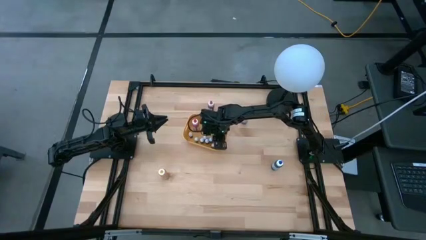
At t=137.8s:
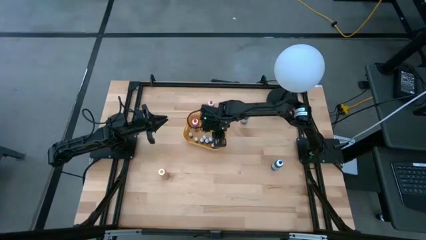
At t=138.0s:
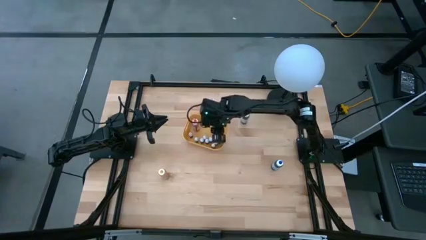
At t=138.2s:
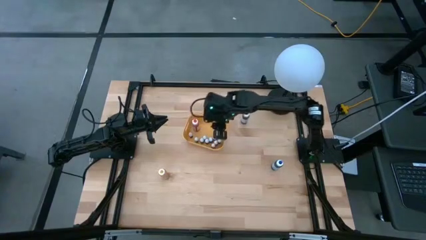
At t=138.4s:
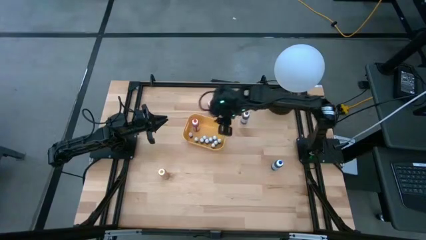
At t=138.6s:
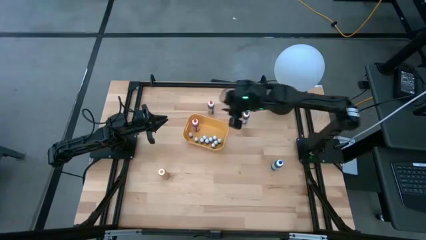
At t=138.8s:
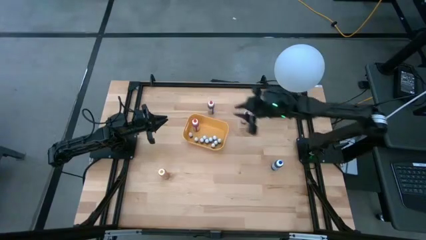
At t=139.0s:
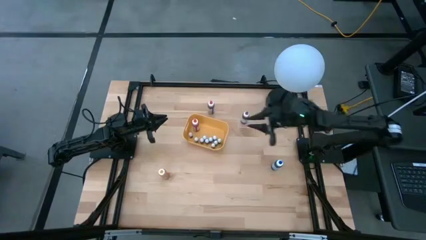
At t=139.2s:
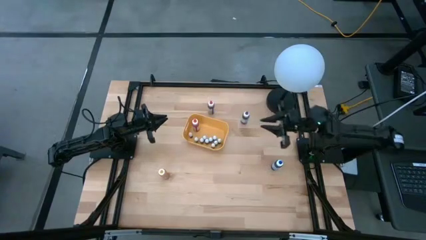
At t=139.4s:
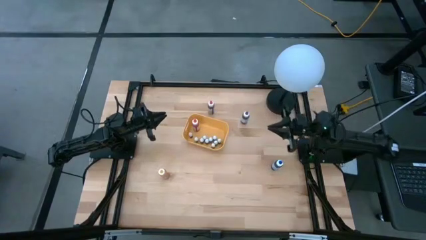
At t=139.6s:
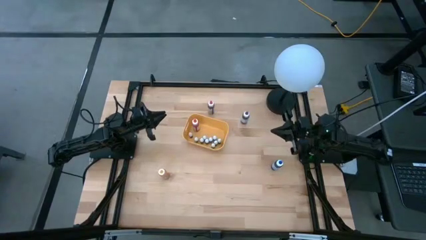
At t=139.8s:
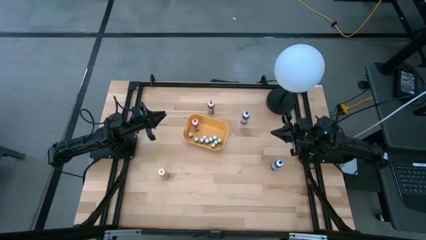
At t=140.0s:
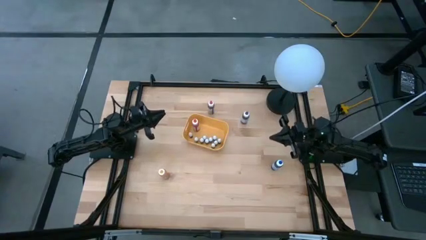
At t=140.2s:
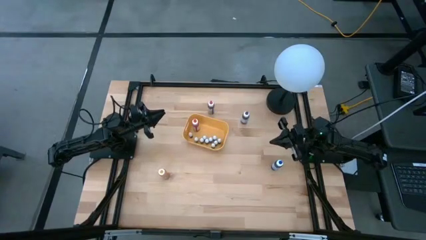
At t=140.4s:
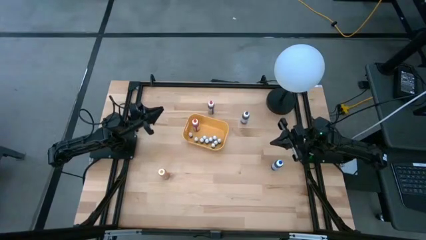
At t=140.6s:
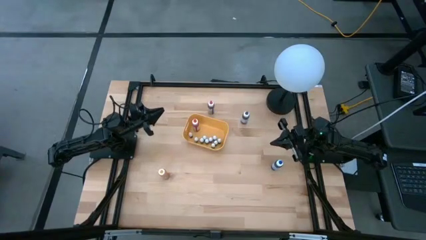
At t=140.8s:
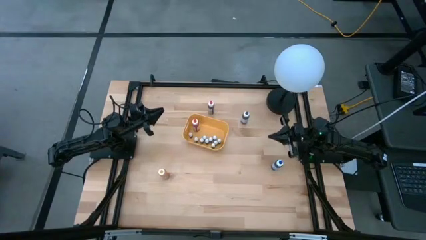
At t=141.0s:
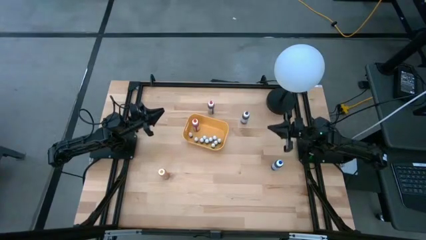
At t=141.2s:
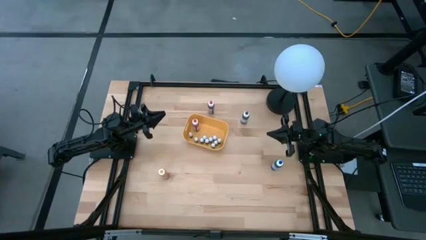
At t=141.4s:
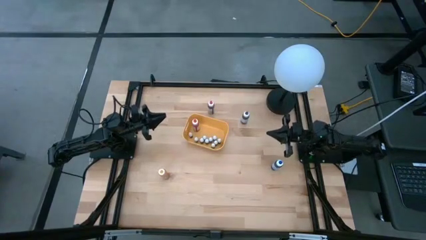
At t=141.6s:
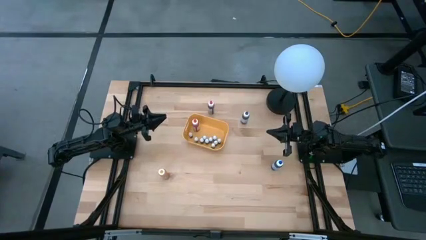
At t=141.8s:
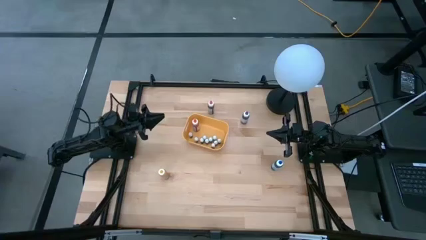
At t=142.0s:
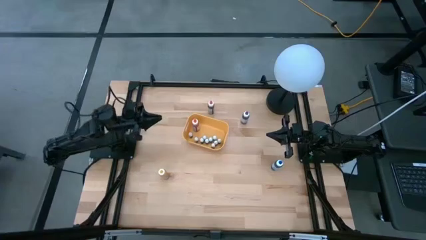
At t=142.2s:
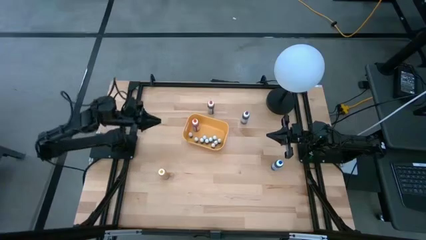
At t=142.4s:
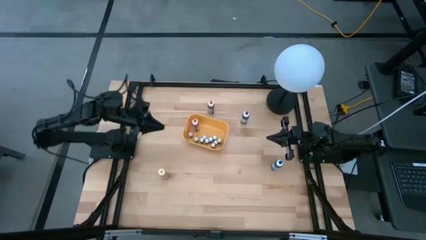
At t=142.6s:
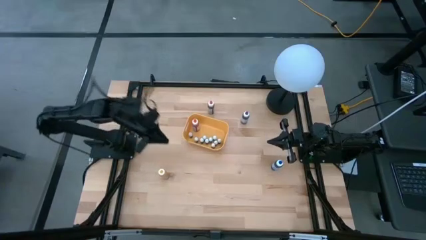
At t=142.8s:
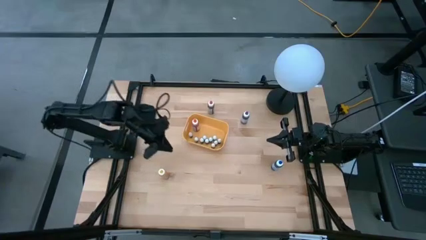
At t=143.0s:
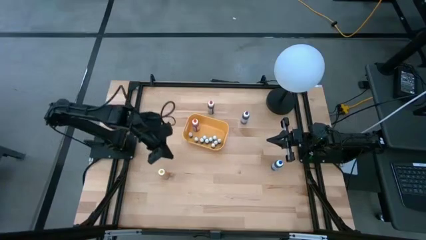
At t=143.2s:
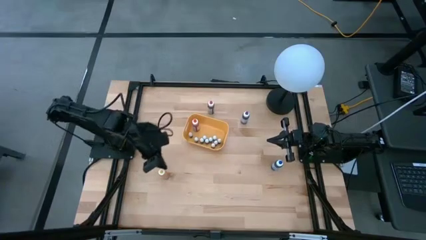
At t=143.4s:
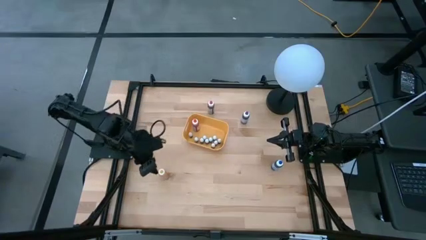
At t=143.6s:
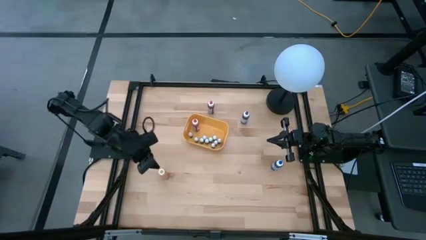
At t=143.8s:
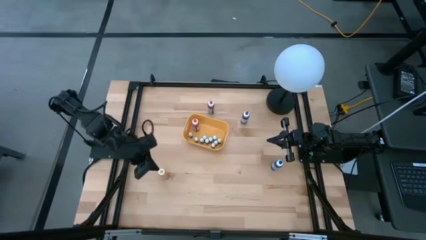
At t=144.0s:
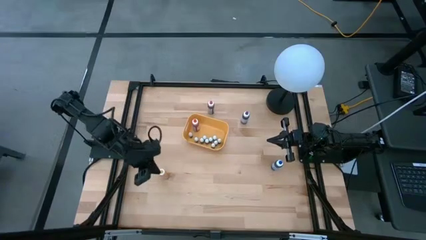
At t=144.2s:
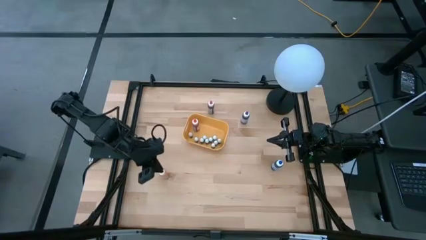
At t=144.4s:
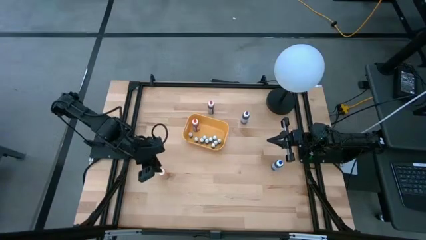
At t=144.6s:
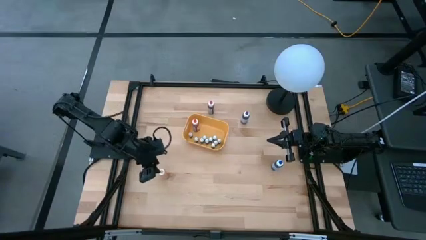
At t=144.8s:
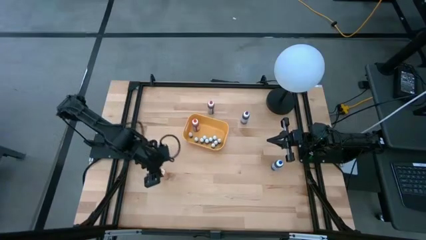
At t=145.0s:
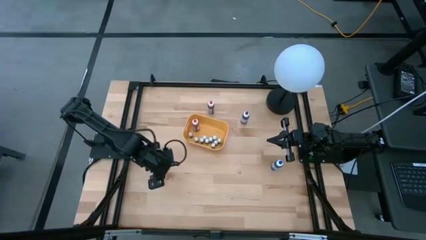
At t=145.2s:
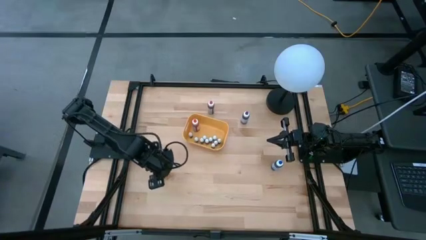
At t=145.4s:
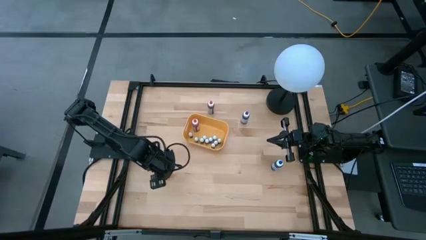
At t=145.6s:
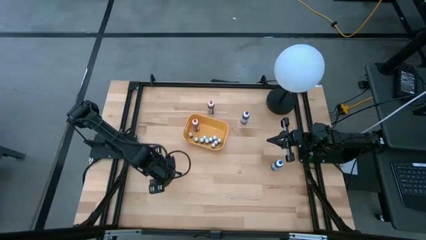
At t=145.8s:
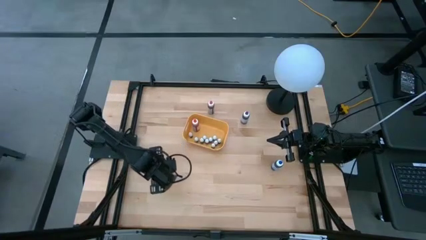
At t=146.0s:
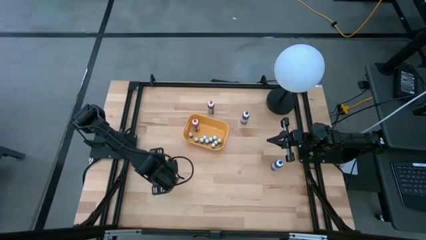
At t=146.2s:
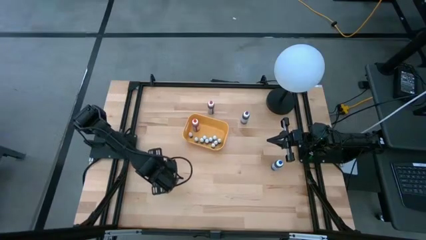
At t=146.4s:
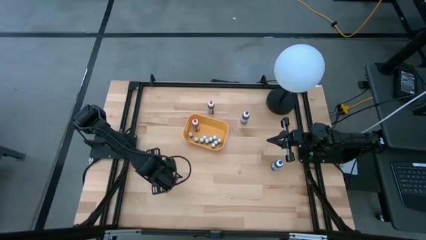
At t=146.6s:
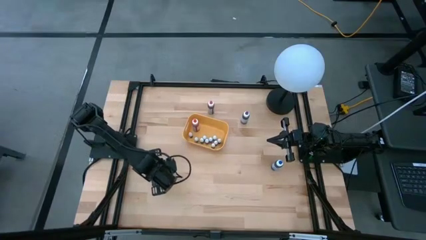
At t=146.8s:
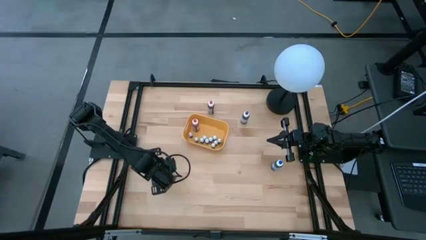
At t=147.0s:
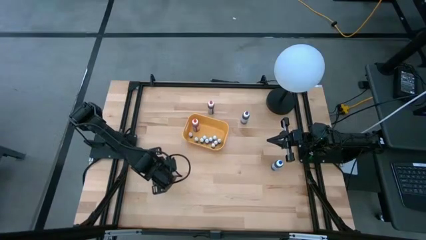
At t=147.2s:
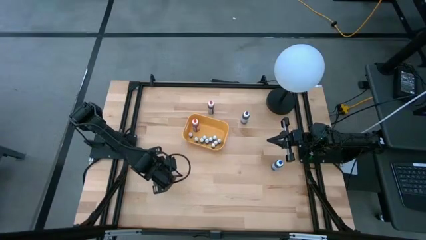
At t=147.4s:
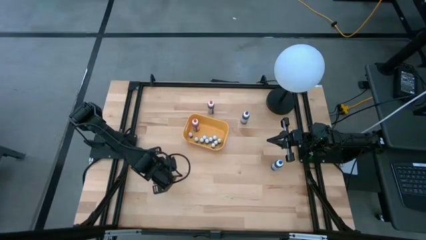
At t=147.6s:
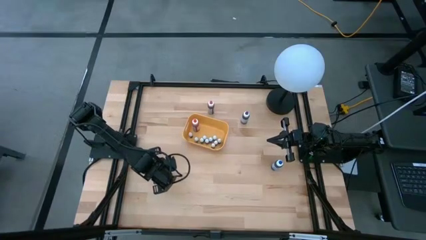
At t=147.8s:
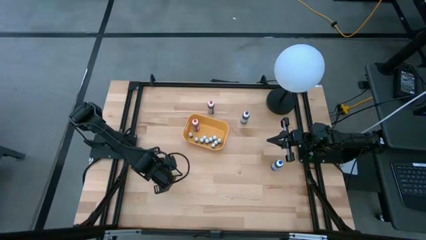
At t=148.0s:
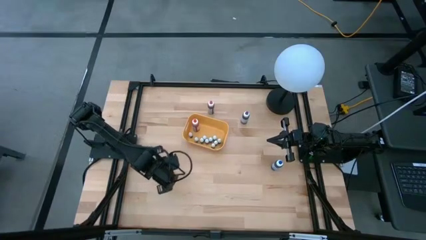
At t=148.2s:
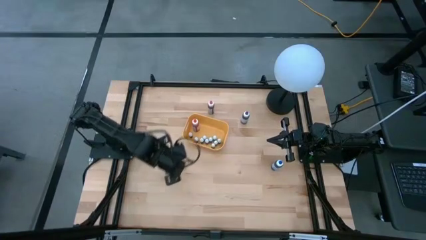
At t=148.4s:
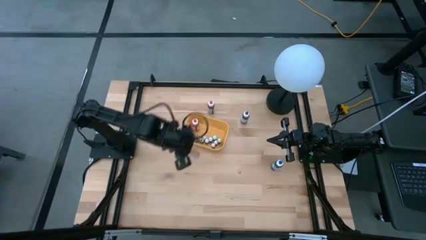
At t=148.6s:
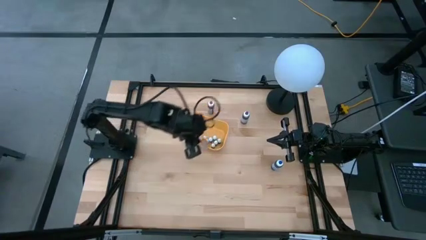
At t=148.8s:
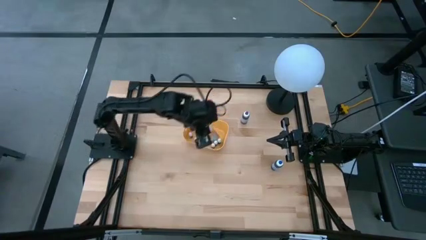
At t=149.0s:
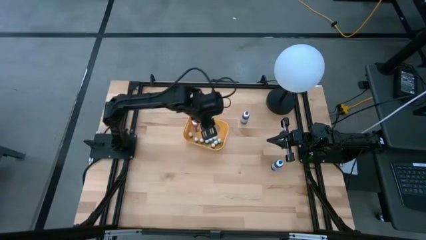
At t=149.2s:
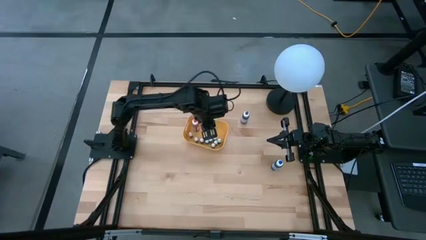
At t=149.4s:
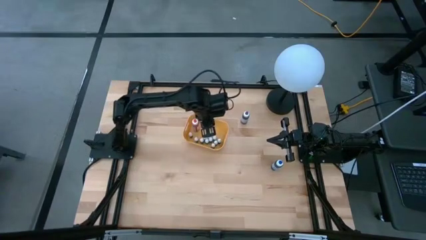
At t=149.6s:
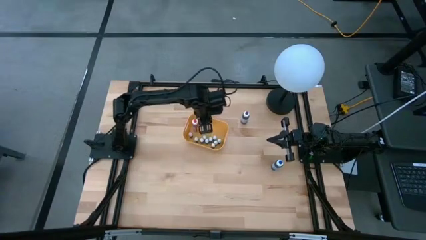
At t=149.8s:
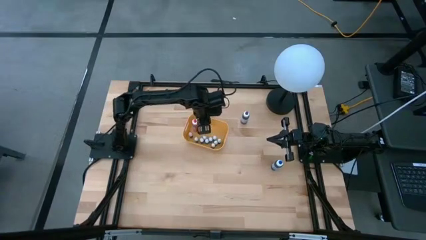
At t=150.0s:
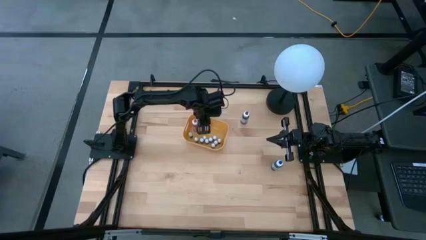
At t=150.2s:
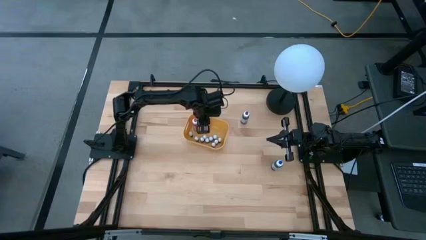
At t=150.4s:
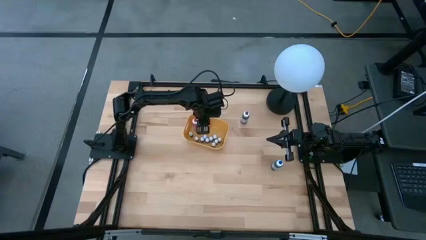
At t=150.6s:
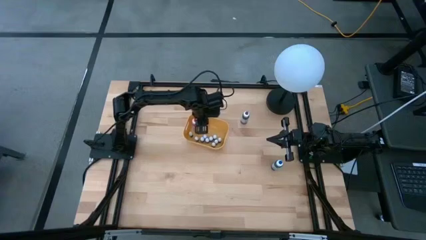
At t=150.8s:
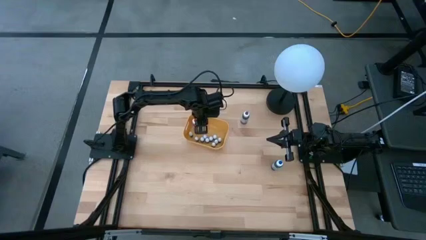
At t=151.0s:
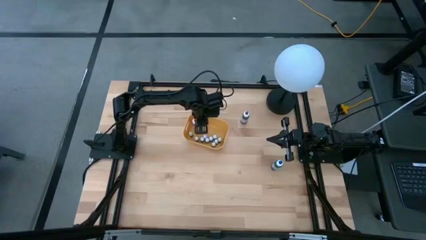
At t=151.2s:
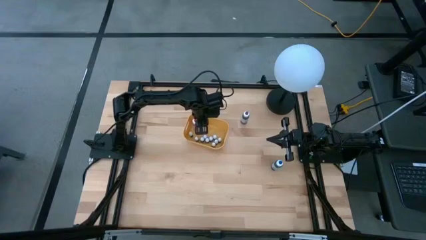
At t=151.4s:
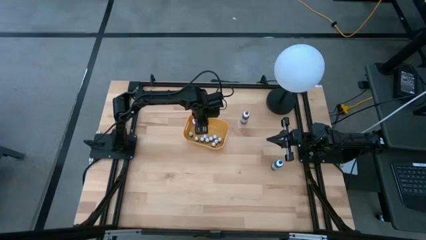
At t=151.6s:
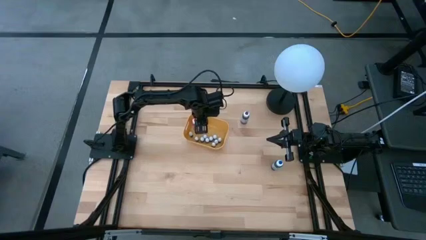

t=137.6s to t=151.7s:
Task: Pick & Place food coloring
Put the large yellow food coloring bottle into the yellow bin

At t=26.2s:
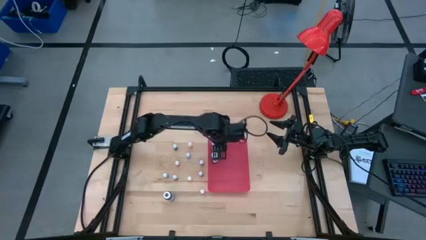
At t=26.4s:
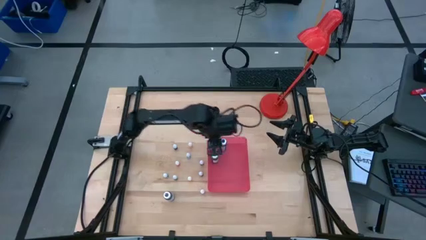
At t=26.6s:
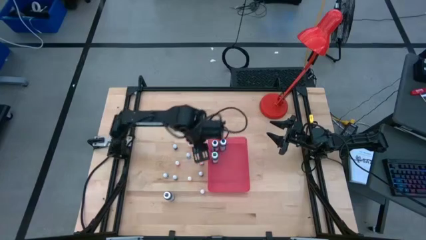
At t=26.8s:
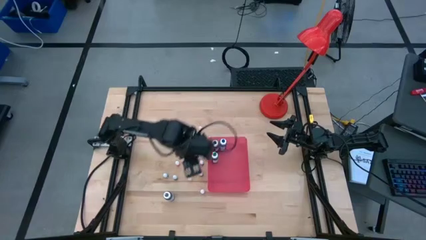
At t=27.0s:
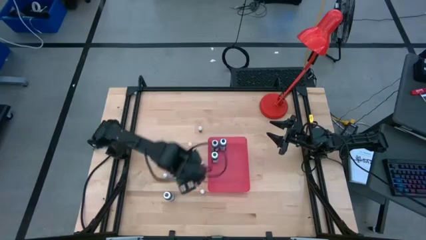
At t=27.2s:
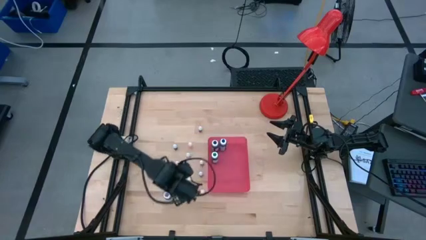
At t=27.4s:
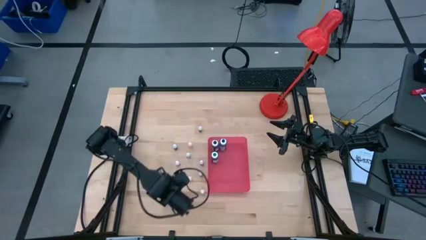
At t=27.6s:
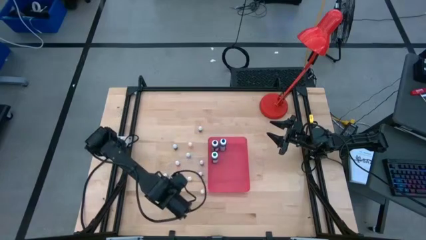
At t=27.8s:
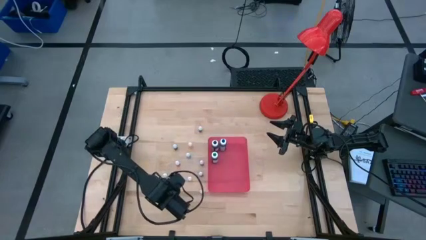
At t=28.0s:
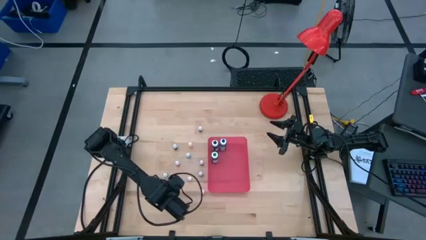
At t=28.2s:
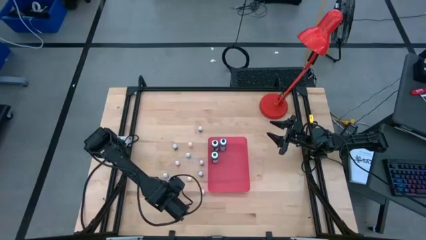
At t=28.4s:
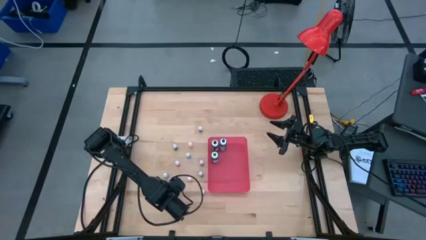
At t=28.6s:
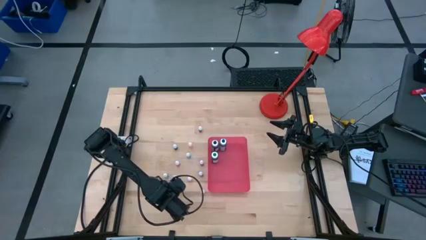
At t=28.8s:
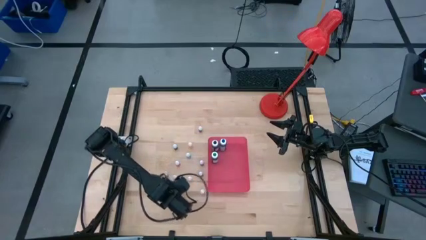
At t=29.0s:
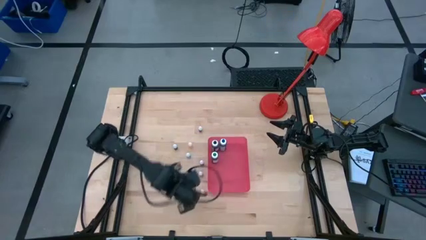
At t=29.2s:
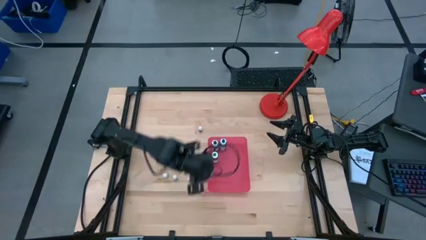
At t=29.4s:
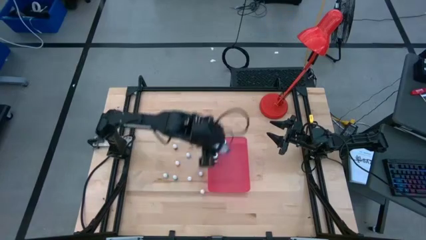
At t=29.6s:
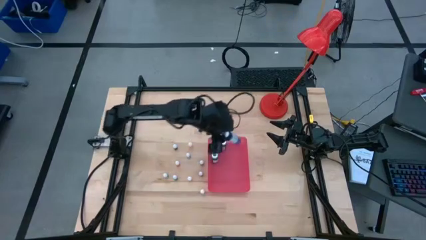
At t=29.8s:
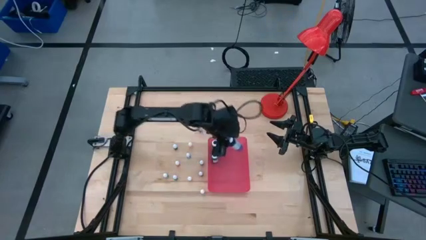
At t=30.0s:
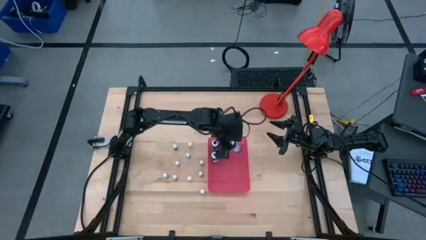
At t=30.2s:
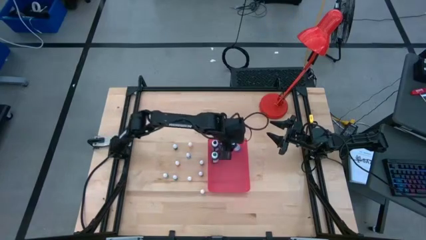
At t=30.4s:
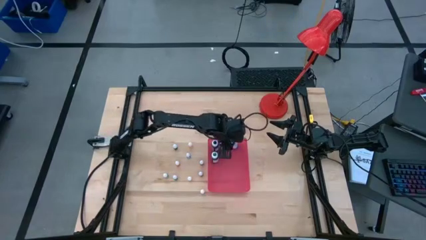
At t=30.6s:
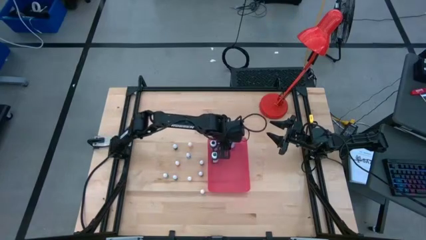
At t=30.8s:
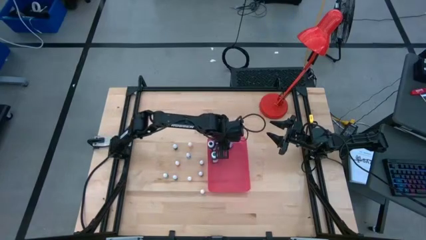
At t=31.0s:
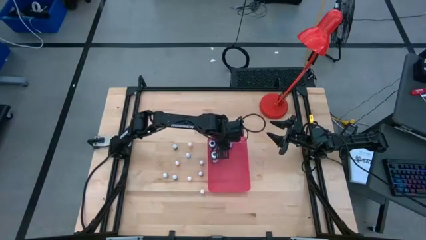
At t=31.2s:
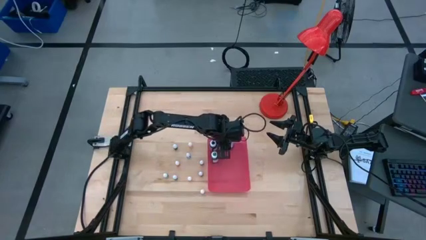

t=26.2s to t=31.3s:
Task: Pick & Place food coloring
Put the big purple food coloring bottle into the red bin
